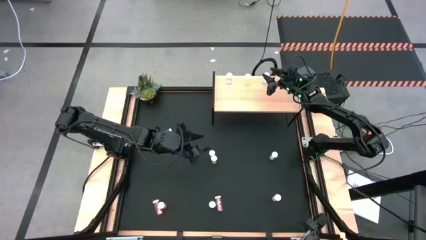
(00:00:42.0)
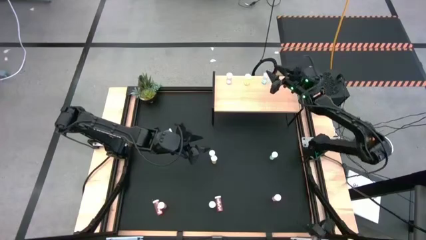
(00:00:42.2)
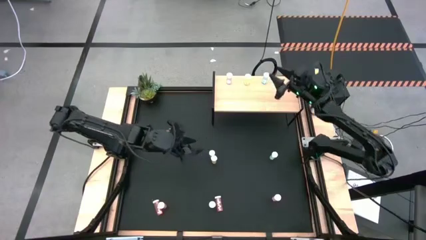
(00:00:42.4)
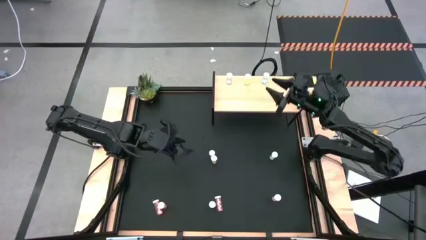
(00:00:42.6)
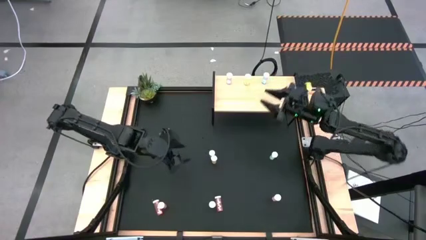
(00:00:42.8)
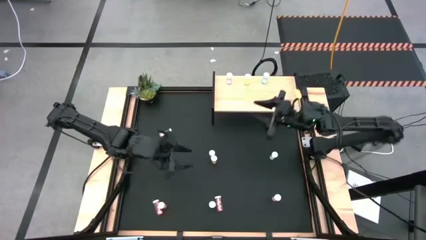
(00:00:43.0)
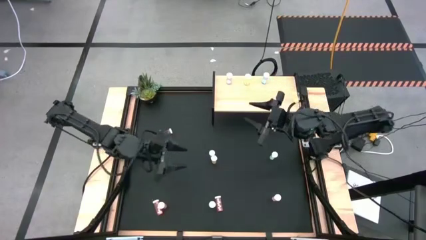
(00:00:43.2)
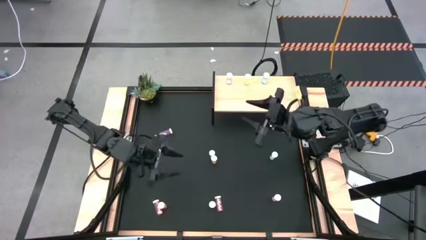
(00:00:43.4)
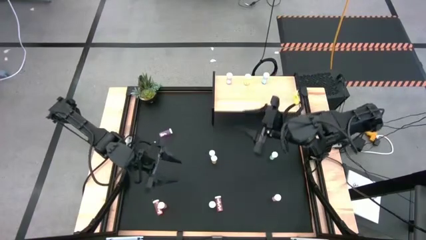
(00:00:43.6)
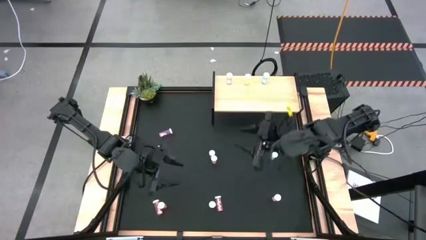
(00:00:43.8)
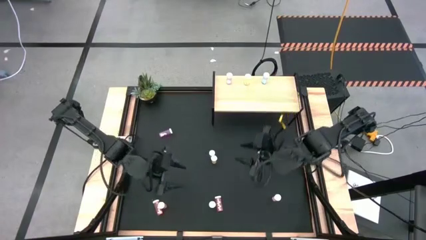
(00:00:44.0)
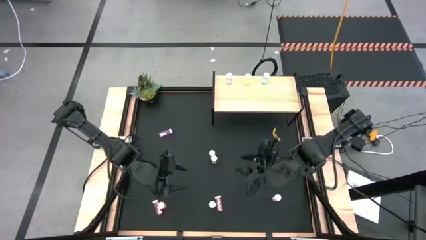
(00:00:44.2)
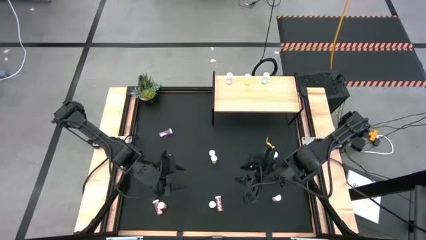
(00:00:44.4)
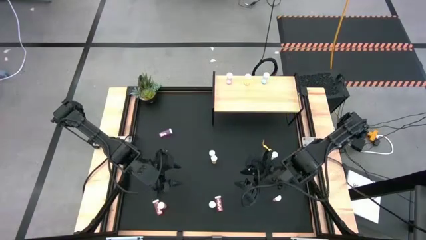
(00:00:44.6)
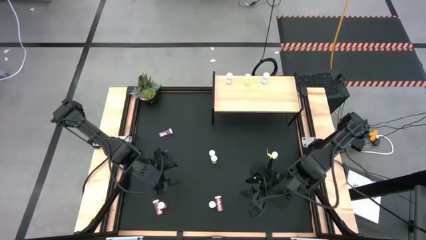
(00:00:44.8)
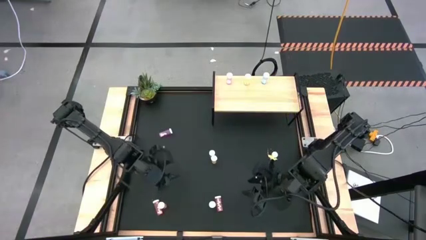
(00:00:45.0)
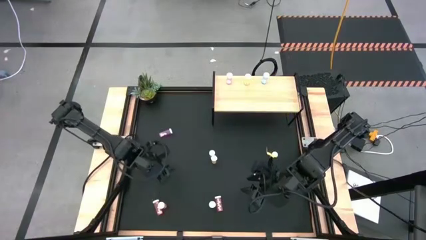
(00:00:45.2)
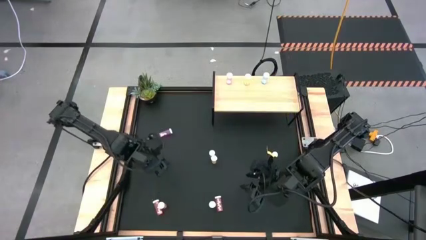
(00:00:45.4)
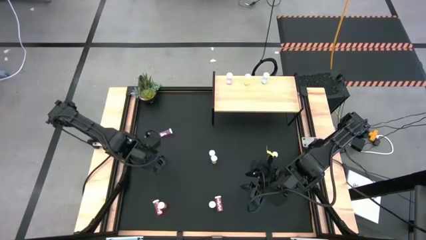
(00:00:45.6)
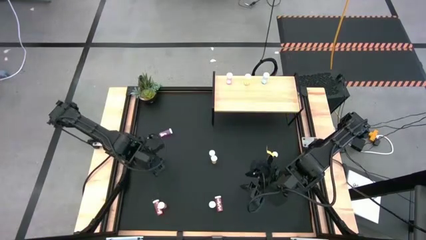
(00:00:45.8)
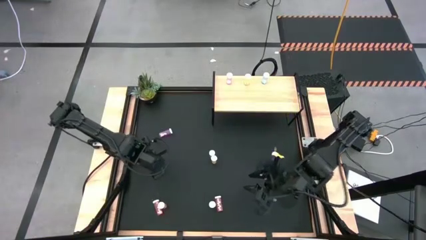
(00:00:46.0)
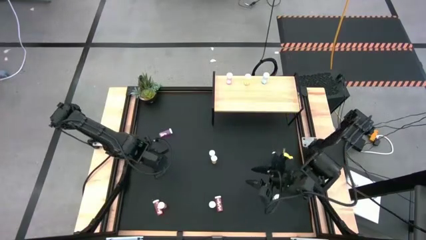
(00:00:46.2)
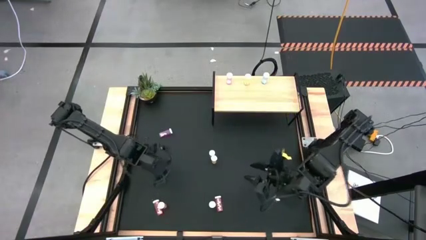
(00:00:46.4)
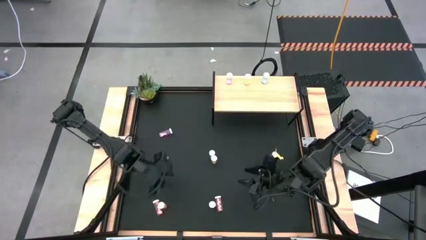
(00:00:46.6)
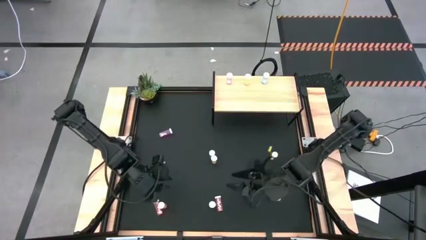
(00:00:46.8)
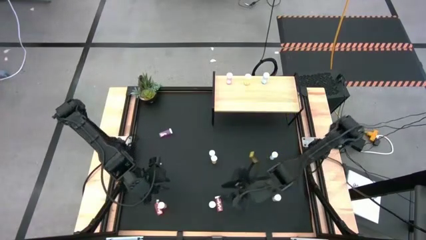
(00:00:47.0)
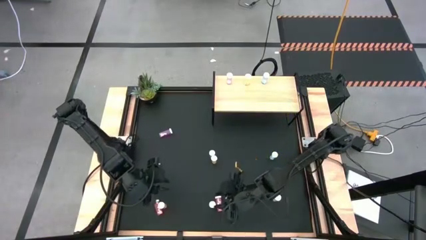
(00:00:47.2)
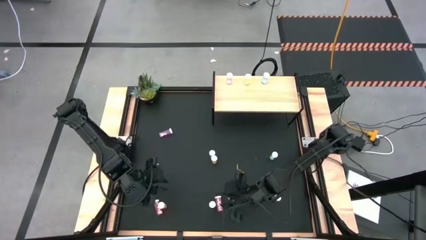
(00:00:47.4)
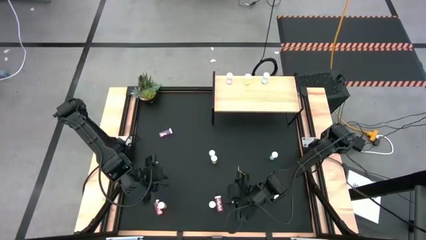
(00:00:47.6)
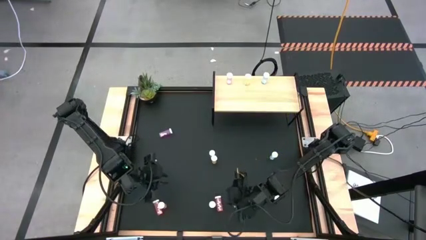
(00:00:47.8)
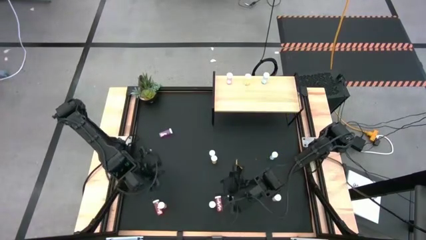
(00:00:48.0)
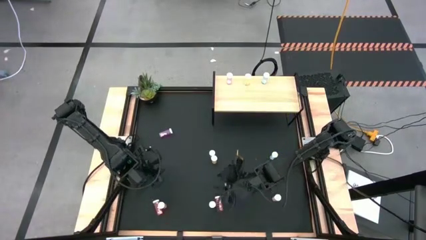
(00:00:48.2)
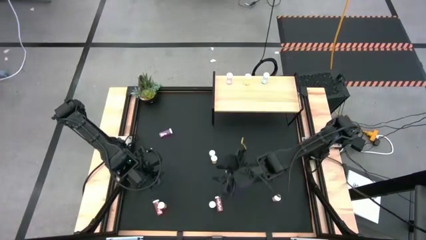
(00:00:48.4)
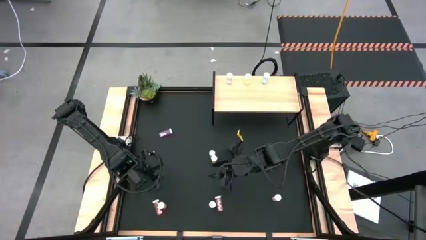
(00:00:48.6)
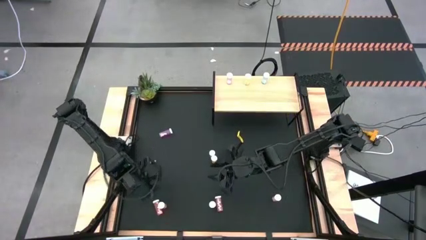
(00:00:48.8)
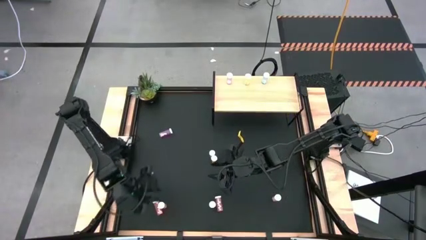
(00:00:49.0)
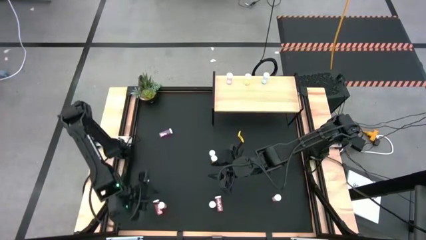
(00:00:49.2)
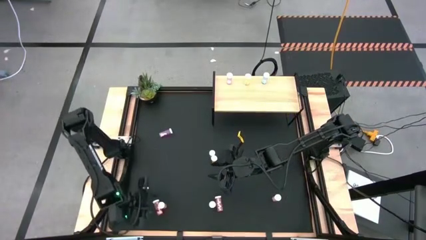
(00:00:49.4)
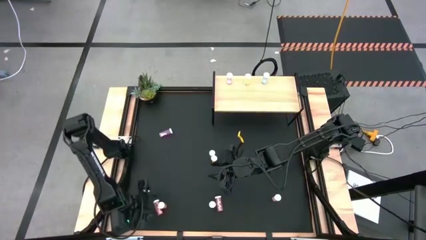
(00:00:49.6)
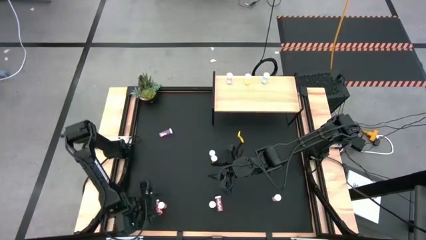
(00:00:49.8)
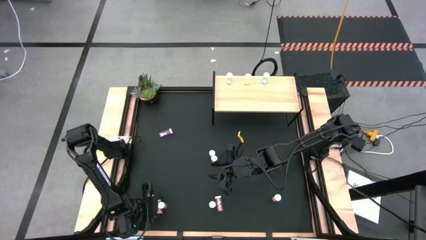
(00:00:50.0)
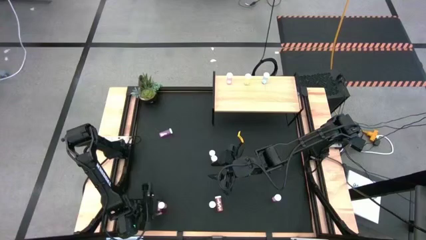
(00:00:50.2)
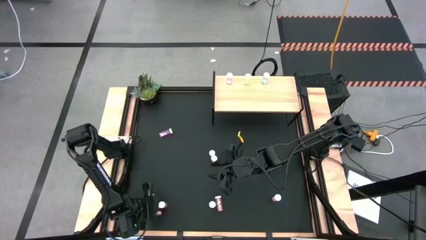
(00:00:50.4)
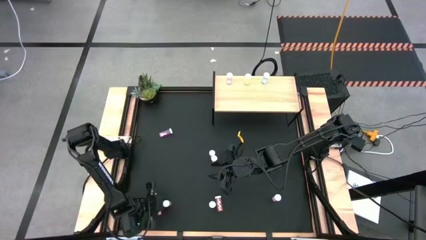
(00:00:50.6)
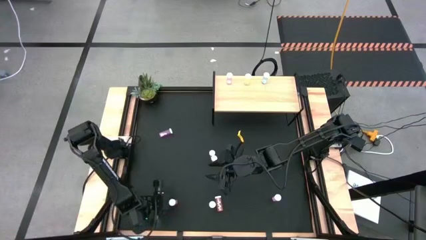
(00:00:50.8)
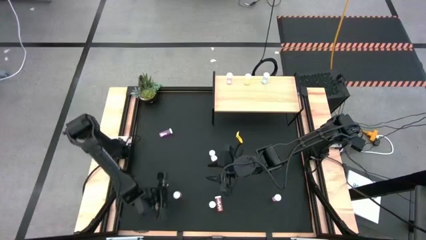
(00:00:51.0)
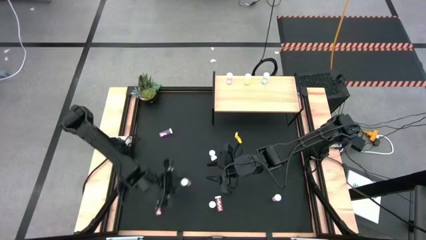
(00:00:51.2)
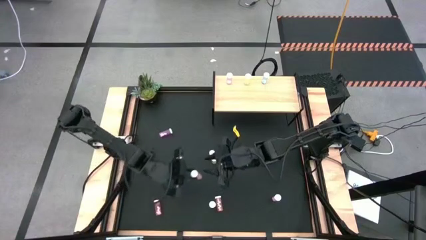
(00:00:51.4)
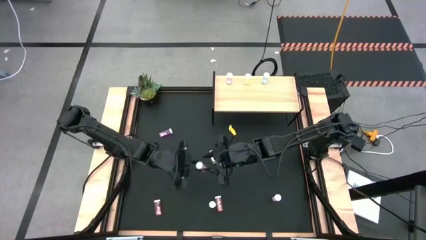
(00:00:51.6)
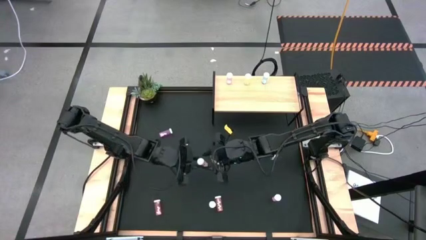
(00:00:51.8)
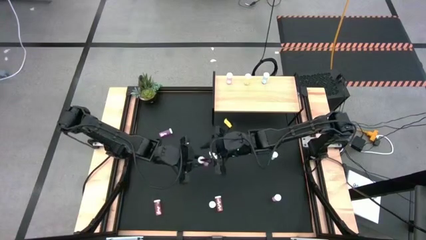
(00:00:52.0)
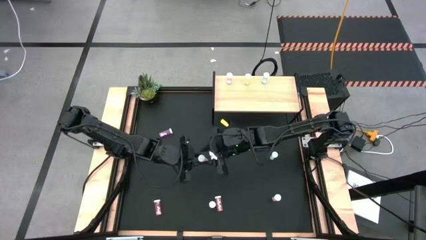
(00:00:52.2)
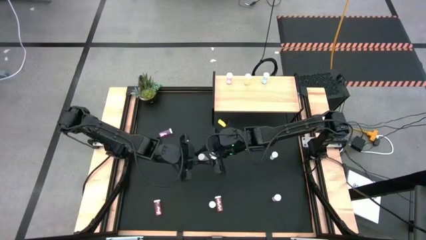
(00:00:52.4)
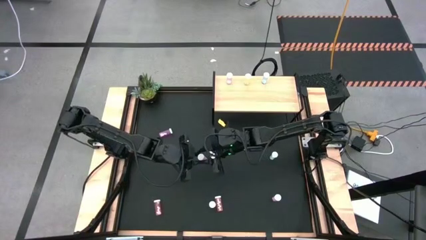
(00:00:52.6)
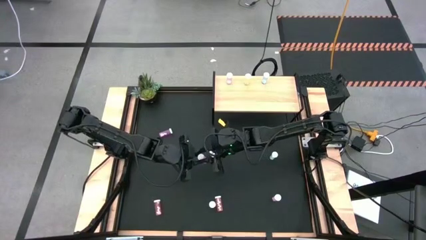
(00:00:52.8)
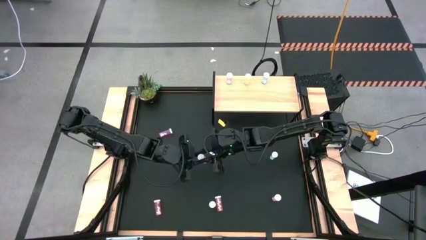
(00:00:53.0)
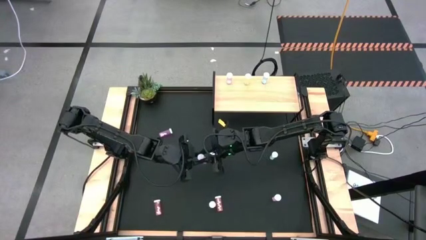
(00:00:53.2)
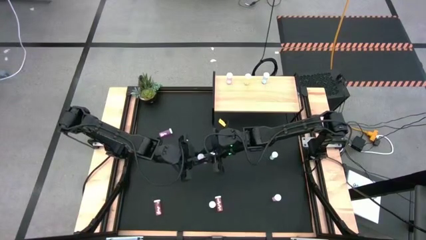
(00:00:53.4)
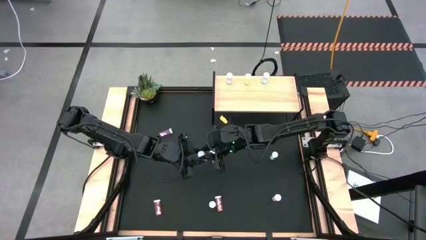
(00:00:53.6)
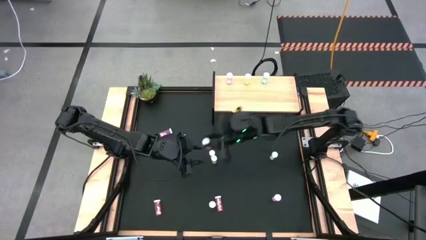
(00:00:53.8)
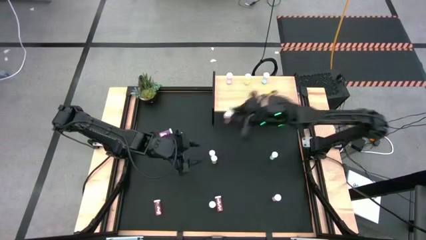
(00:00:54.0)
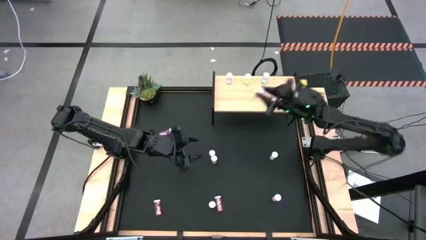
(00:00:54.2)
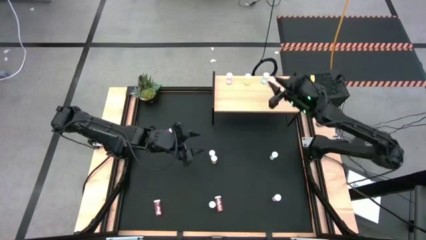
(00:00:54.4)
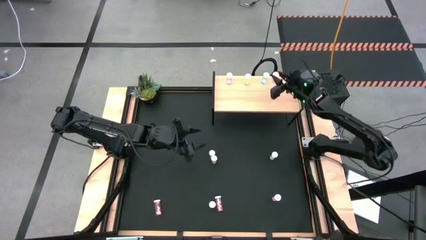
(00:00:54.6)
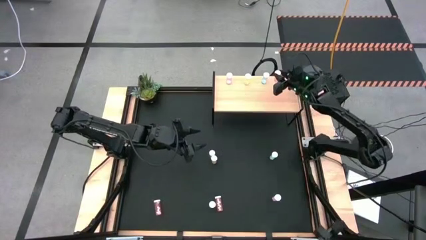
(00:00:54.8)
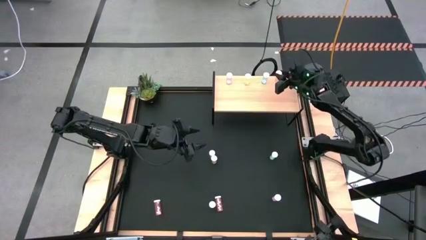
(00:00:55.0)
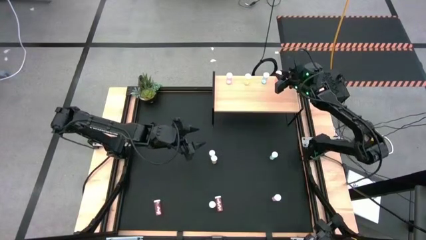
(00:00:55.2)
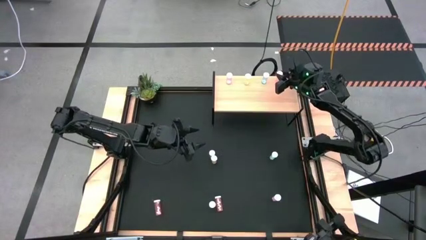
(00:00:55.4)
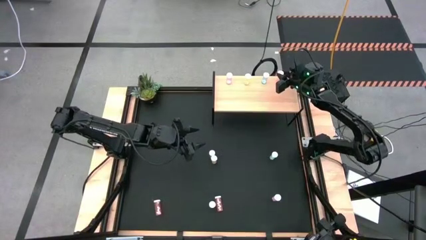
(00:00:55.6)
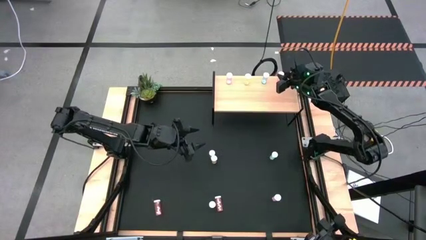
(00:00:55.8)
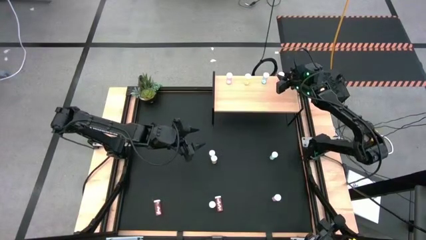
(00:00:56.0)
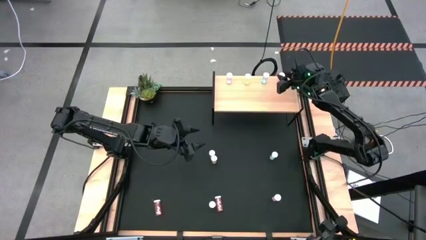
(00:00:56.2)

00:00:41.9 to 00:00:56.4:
Task: Pick and place medicine bottles onto shelf by color
Put the middle pink pill bottle on the shelf
